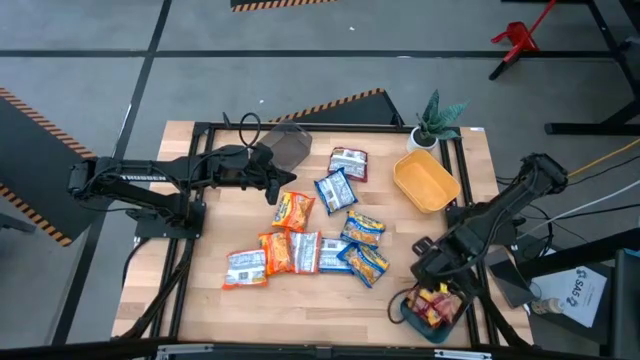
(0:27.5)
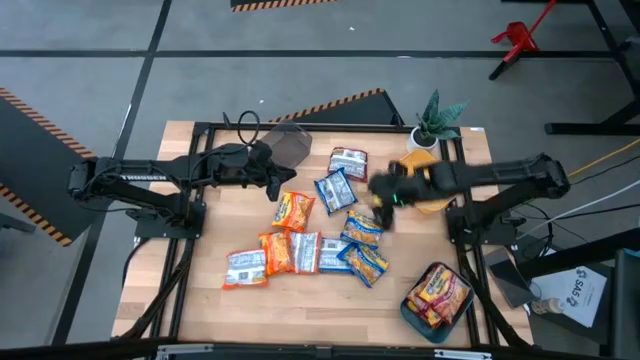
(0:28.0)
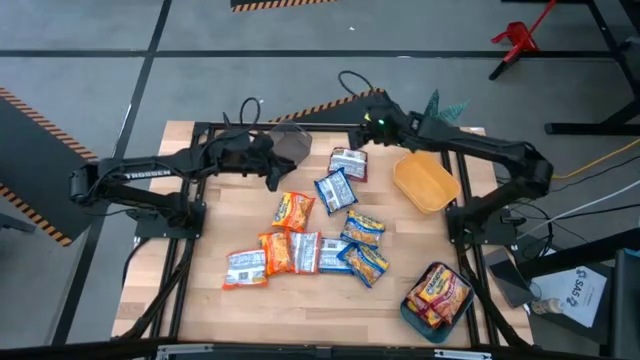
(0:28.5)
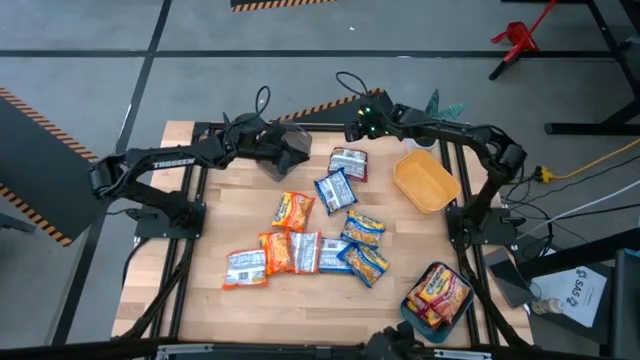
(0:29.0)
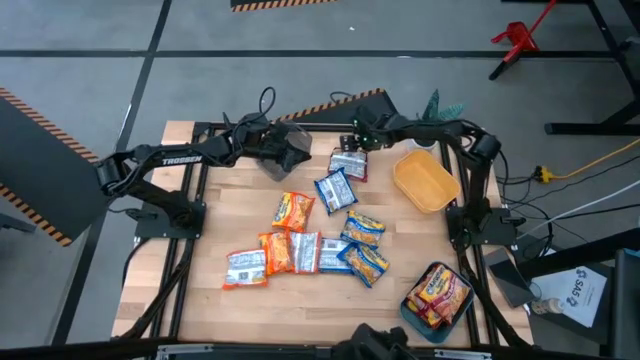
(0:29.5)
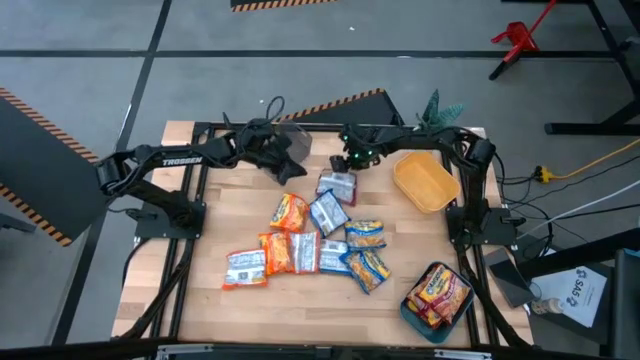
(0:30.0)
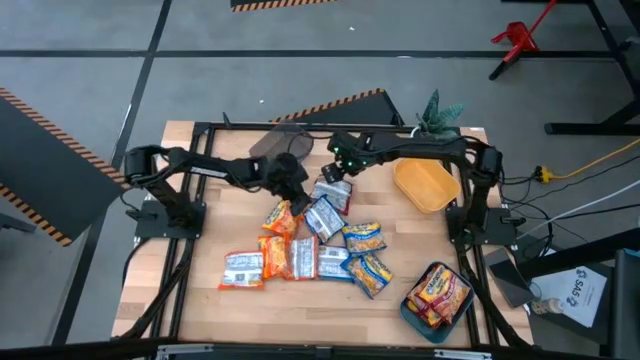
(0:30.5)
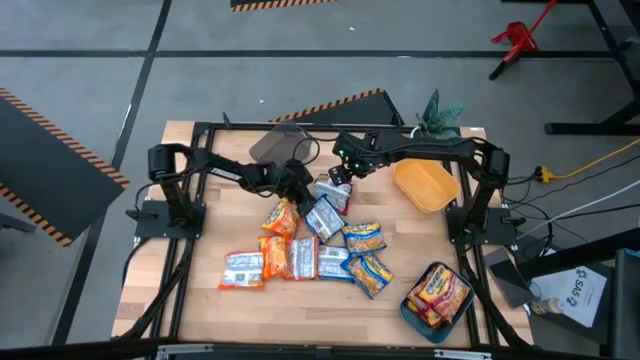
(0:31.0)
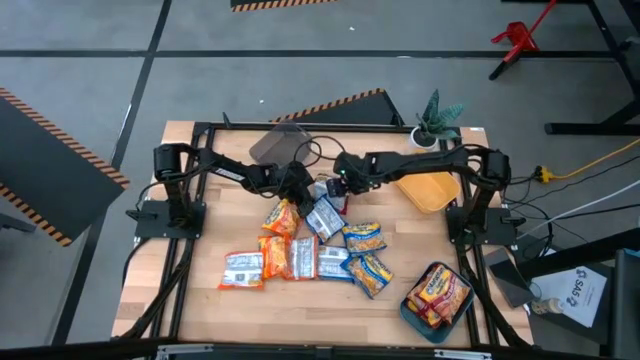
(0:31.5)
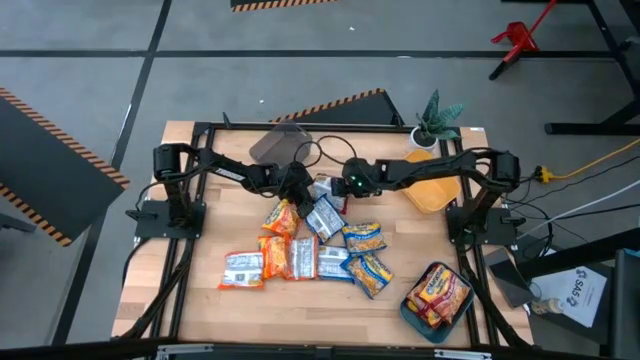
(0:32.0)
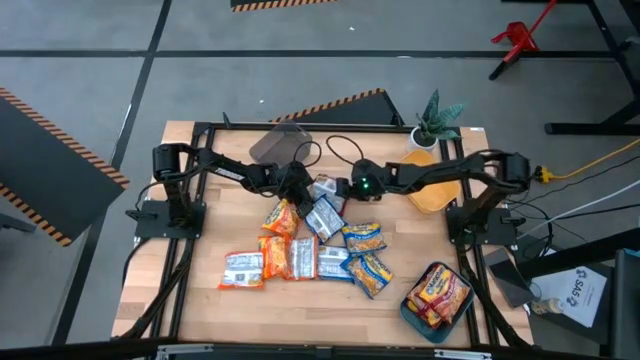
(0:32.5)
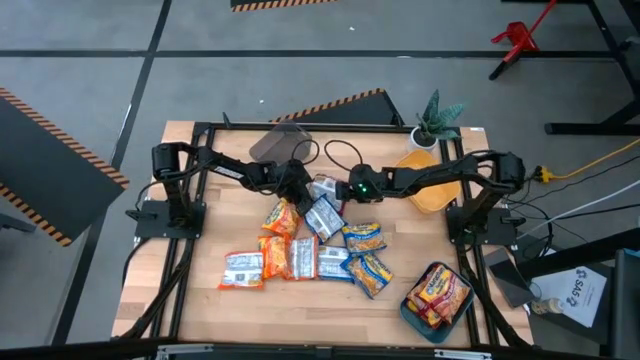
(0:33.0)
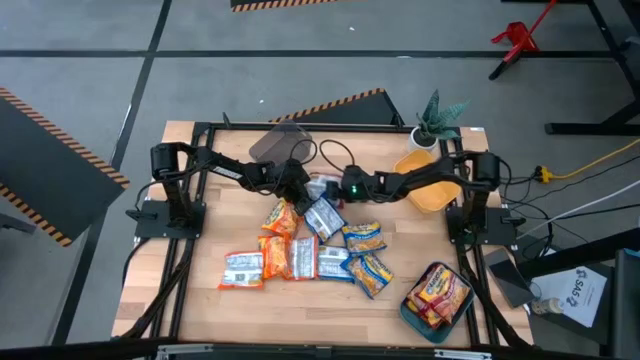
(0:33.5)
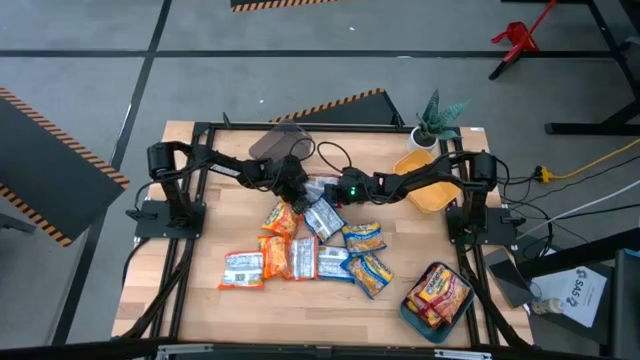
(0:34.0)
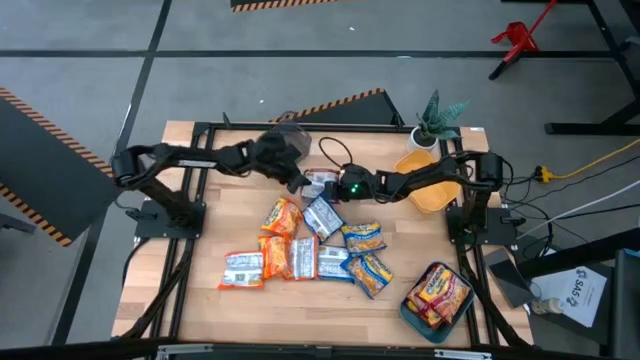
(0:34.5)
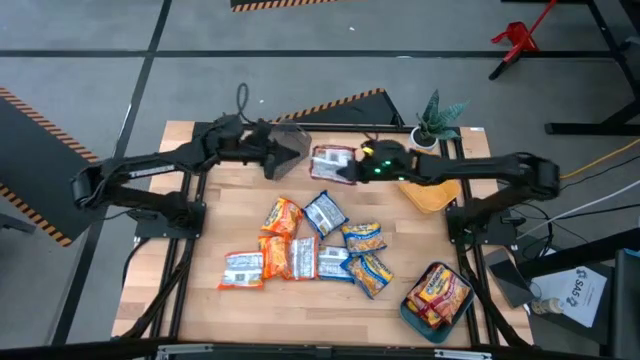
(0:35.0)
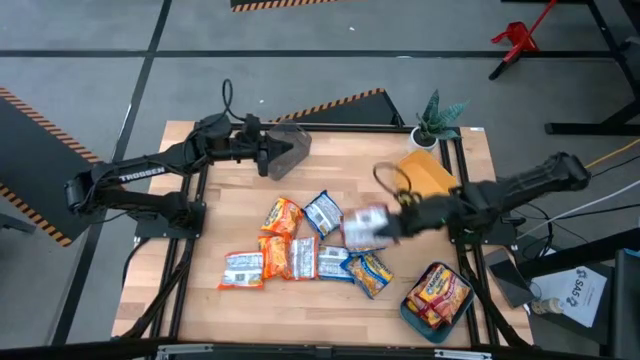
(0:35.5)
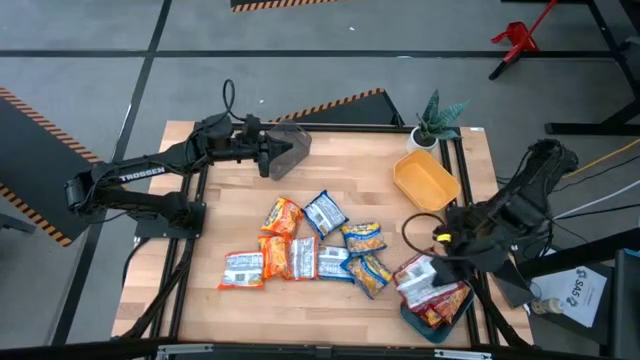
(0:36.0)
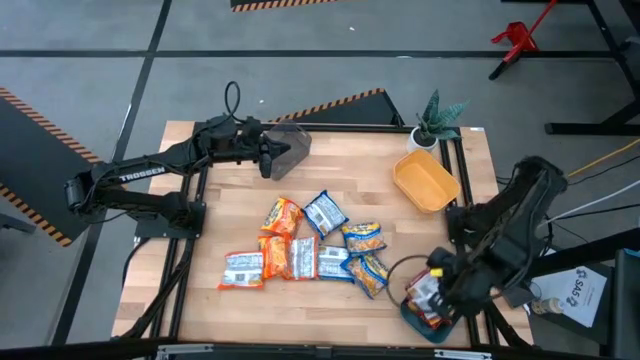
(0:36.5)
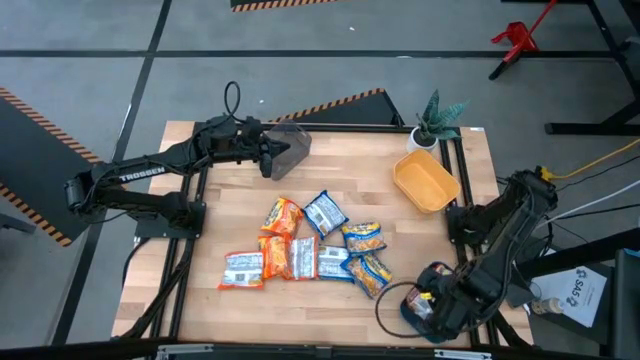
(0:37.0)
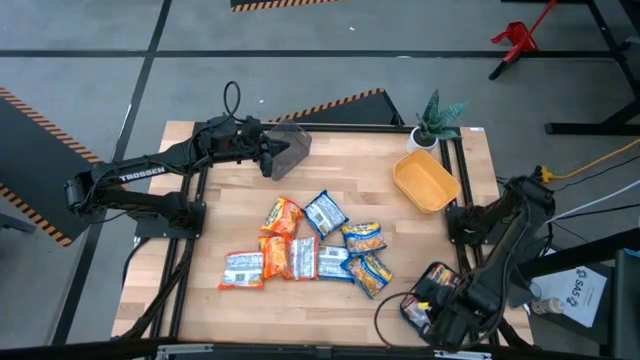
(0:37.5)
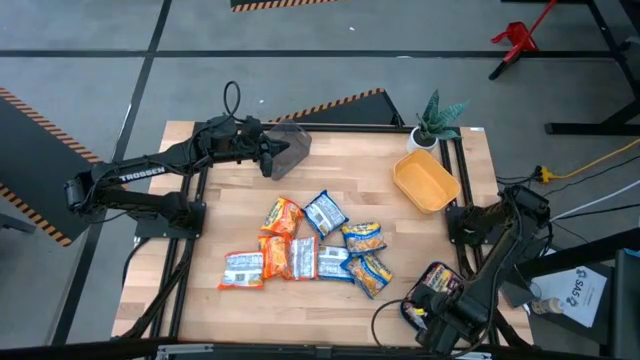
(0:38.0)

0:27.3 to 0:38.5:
Task: Sort Maruchan noodles
Put the red noodle pack into the blue bin

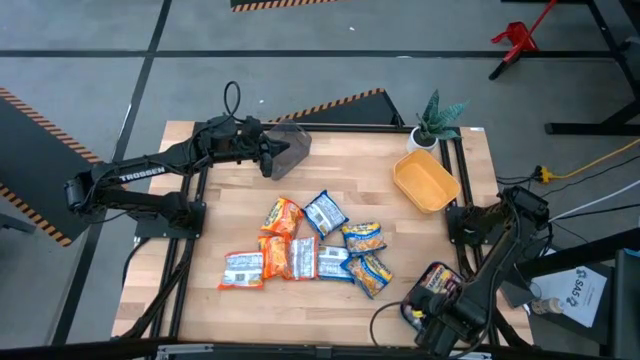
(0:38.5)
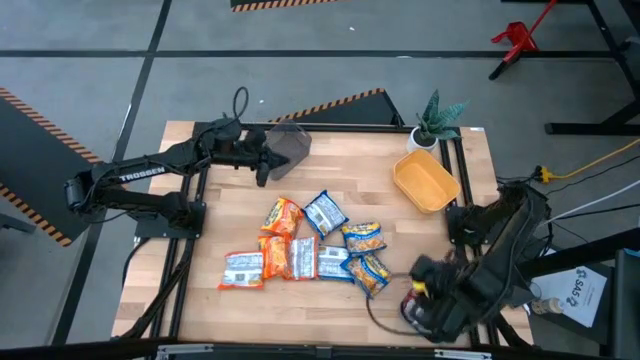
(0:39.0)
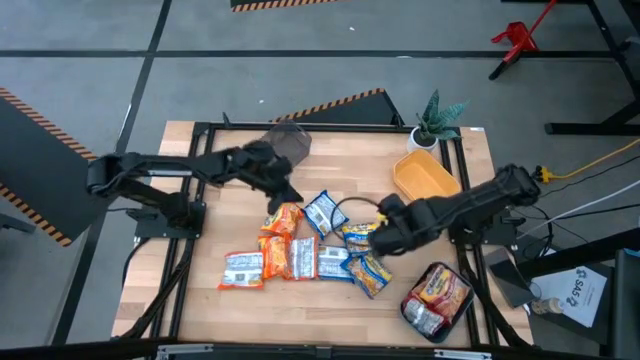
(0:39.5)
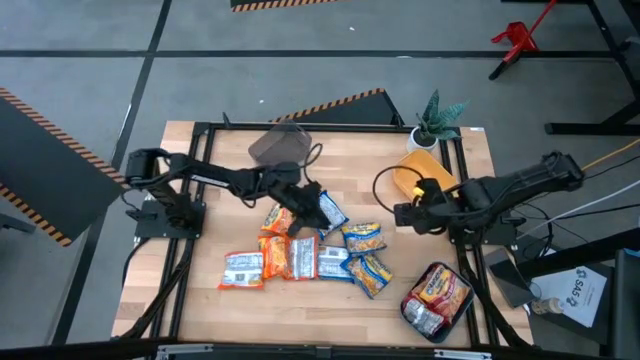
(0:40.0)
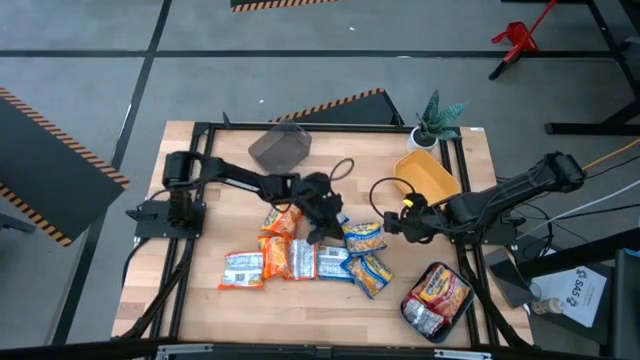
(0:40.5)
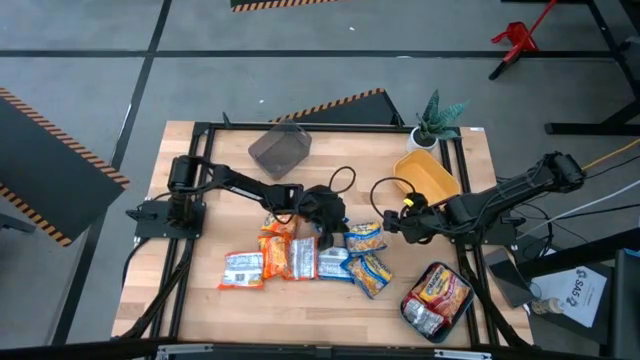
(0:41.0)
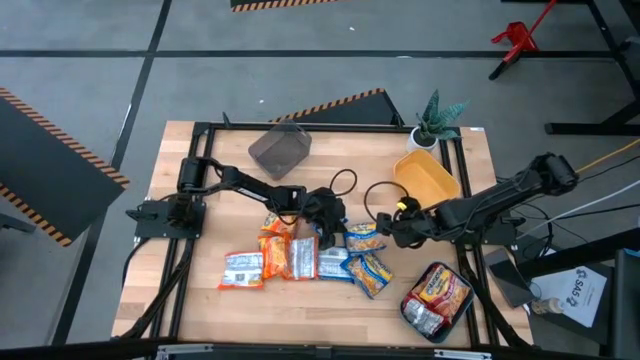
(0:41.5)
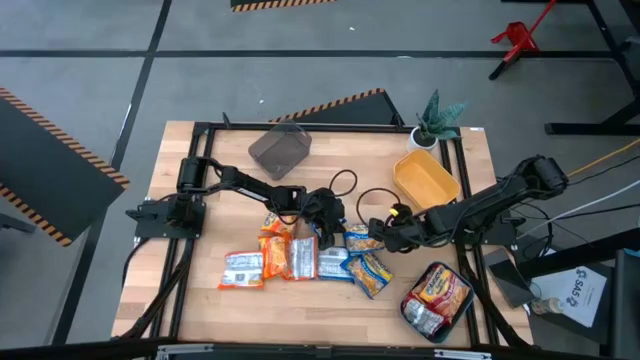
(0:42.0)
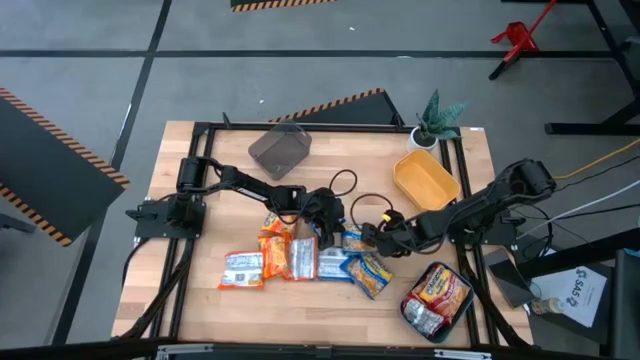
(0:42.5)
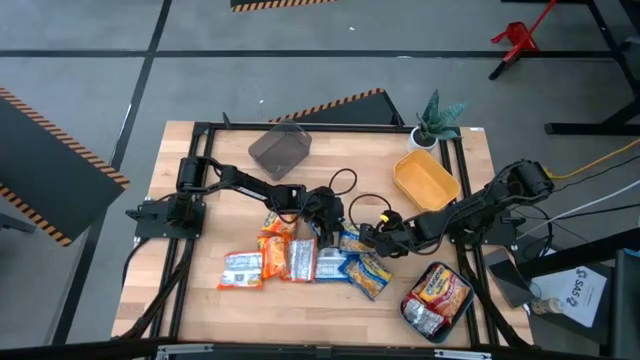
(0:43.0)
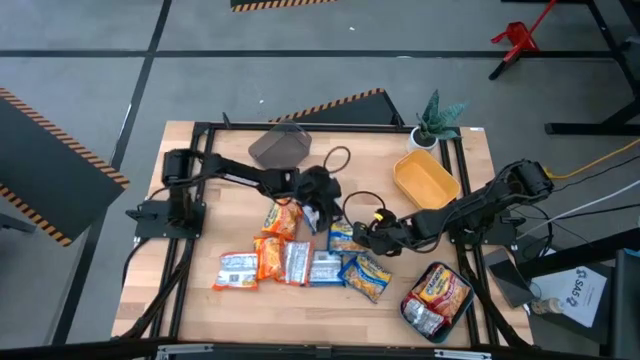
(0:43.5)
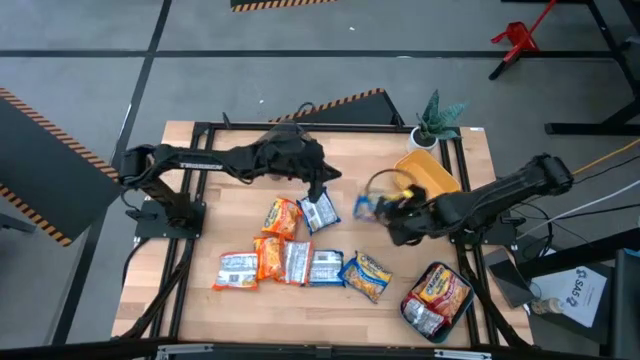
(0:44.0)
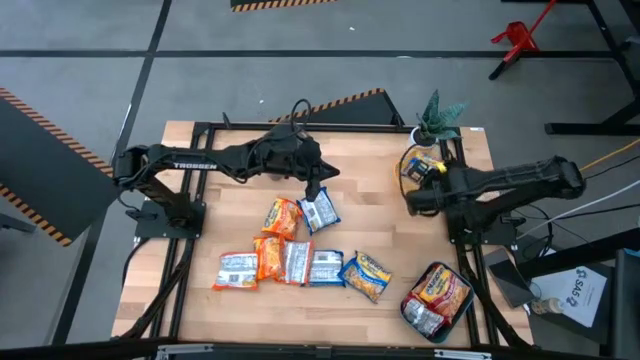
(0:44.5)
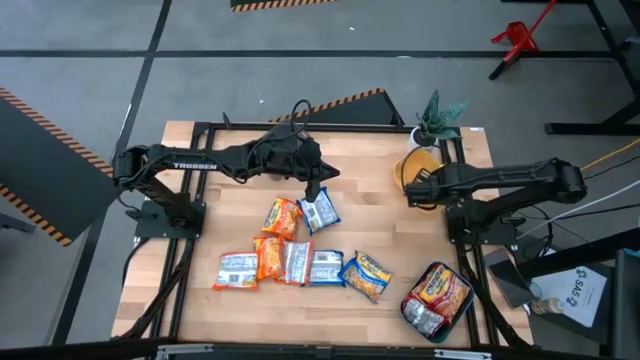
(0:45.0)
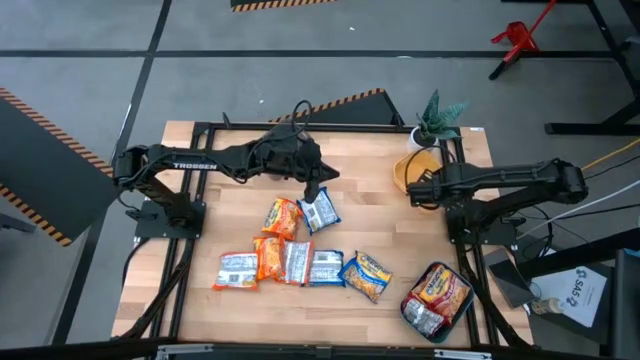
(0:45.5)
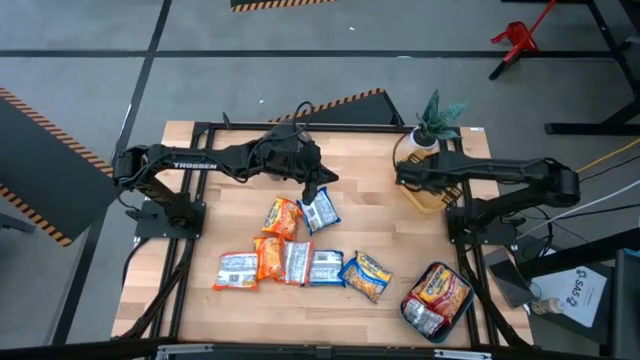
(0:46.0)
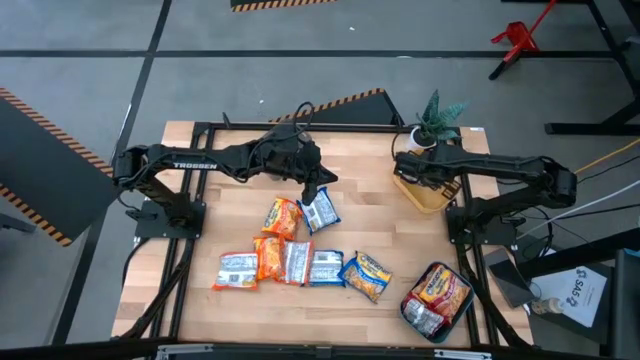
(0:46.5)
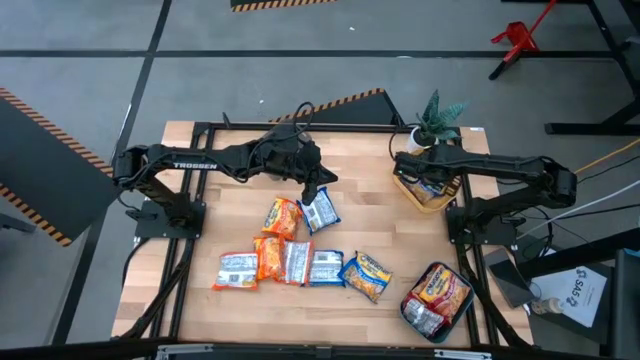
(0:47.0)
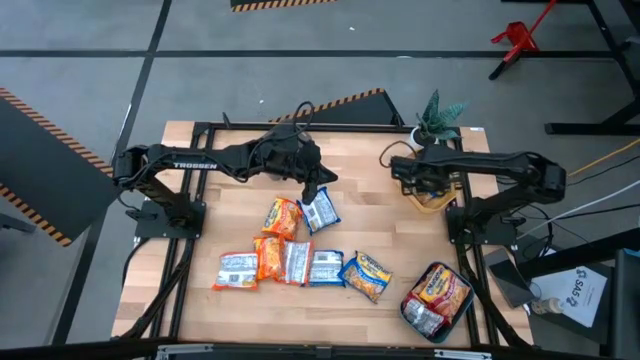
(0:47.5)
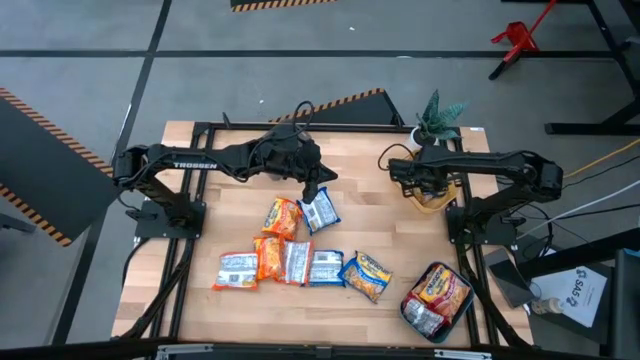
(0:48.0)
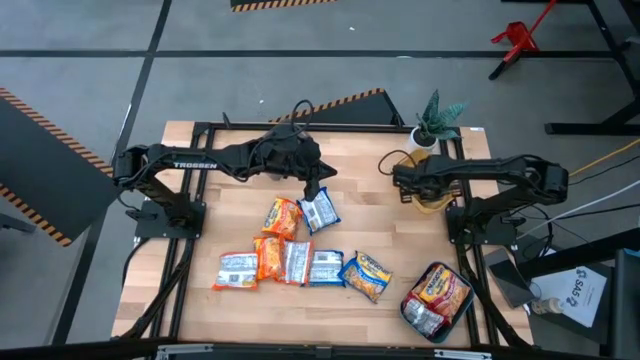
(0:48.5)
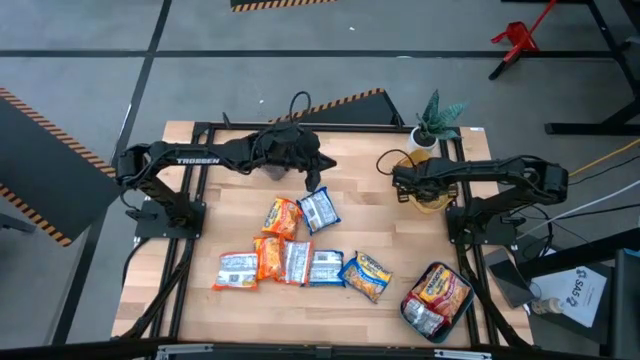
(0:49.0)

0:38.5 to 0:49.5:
Put the blue noodle pack into the yellow bin
